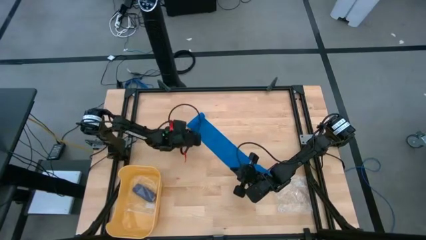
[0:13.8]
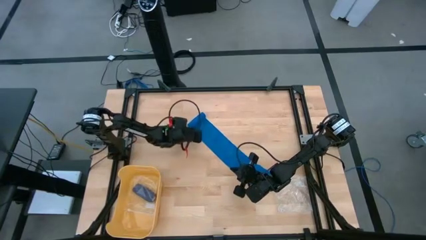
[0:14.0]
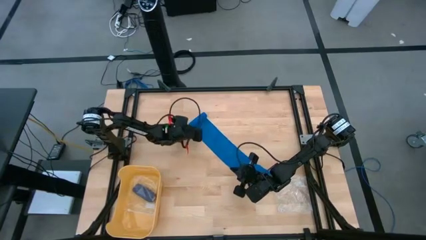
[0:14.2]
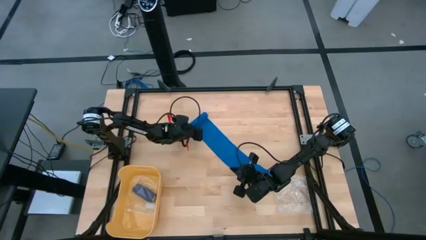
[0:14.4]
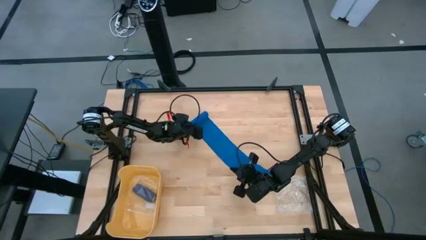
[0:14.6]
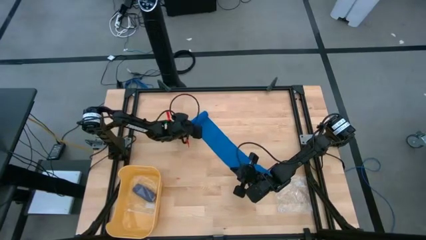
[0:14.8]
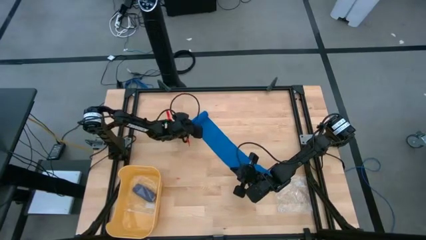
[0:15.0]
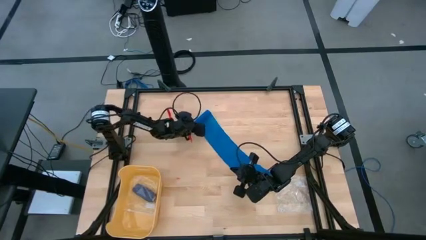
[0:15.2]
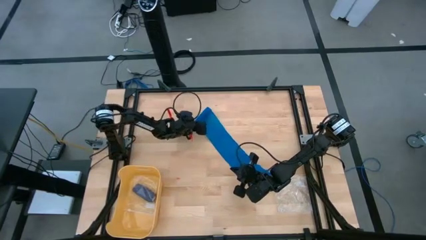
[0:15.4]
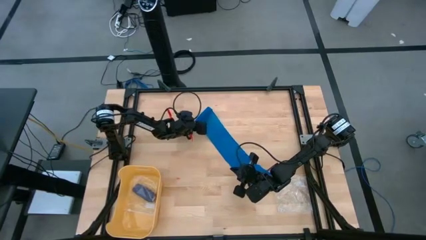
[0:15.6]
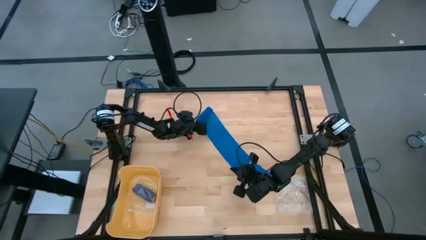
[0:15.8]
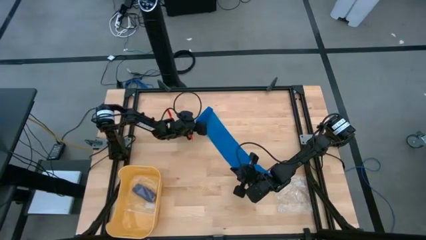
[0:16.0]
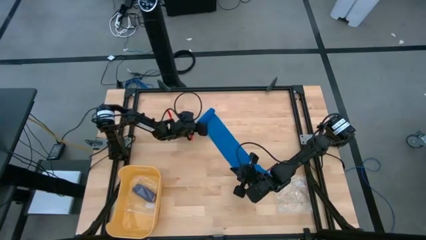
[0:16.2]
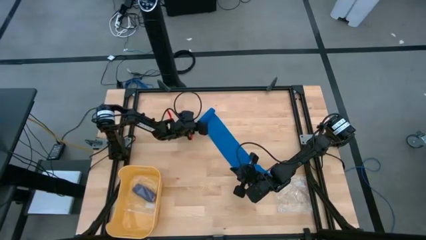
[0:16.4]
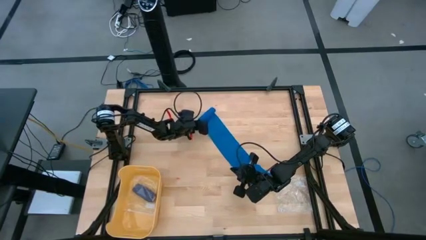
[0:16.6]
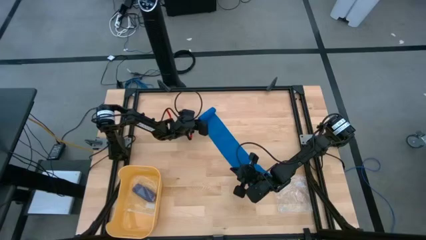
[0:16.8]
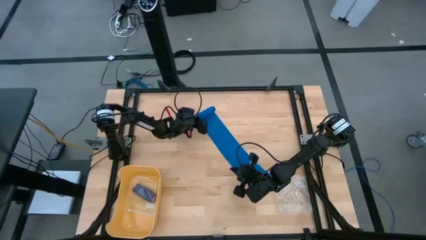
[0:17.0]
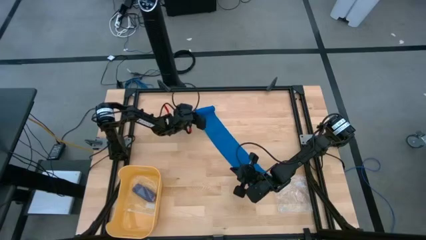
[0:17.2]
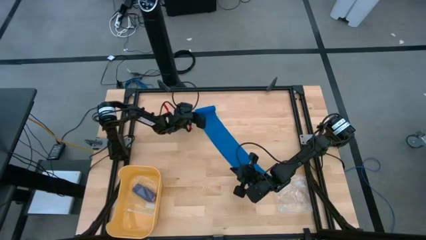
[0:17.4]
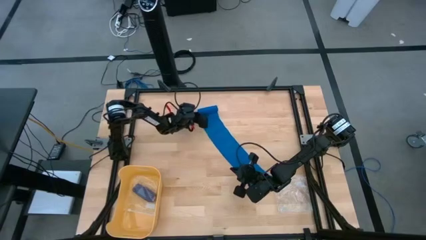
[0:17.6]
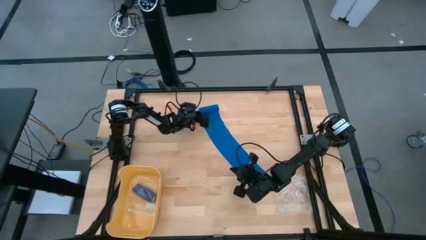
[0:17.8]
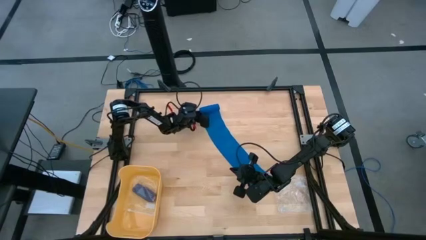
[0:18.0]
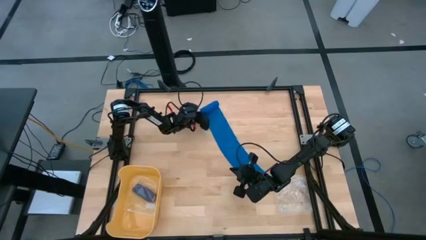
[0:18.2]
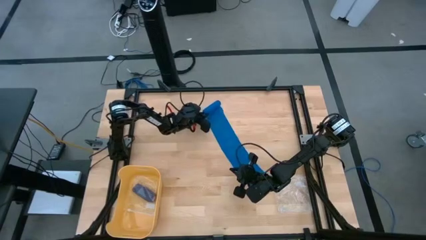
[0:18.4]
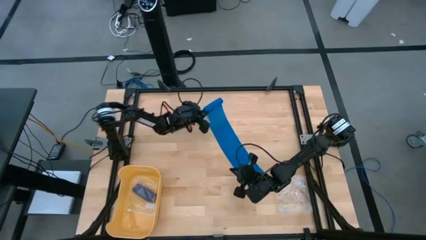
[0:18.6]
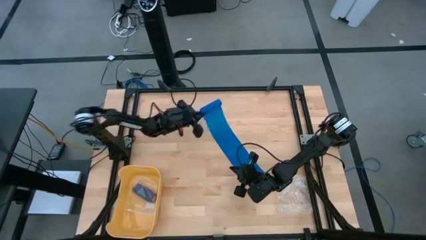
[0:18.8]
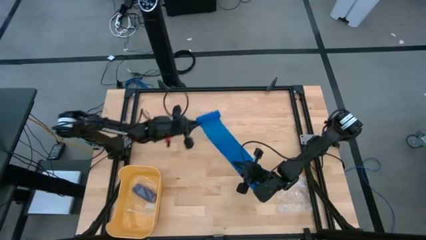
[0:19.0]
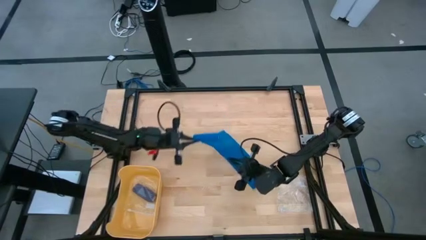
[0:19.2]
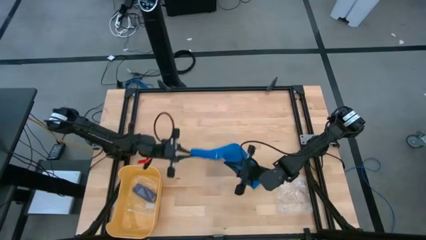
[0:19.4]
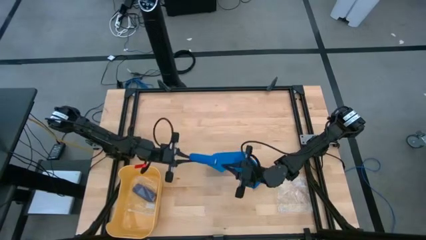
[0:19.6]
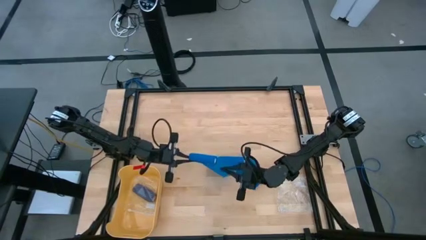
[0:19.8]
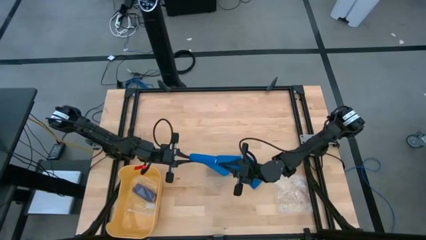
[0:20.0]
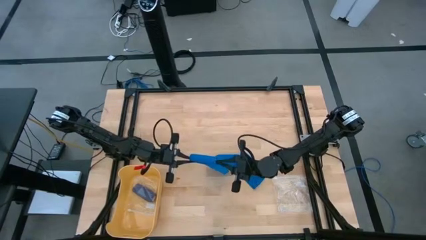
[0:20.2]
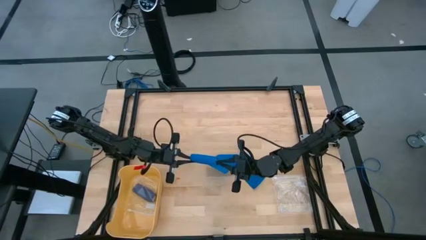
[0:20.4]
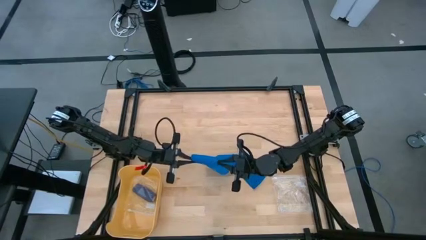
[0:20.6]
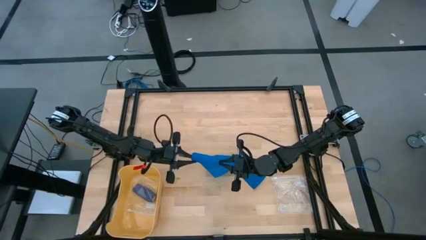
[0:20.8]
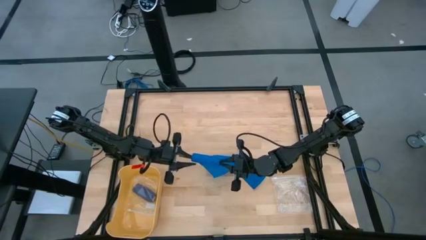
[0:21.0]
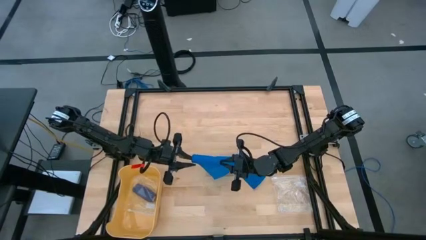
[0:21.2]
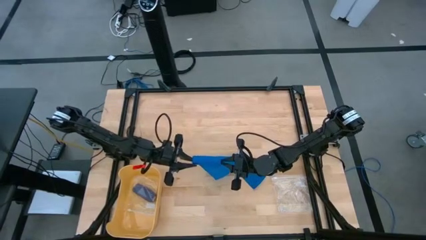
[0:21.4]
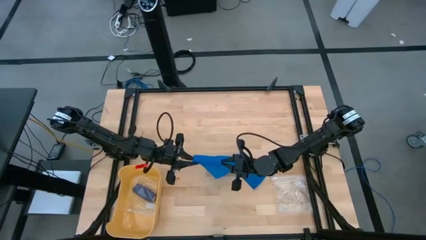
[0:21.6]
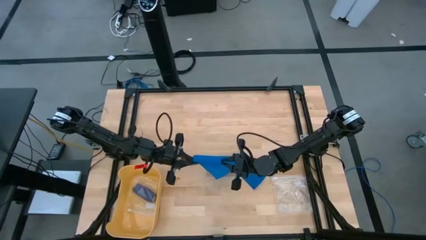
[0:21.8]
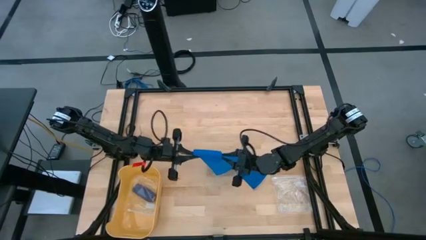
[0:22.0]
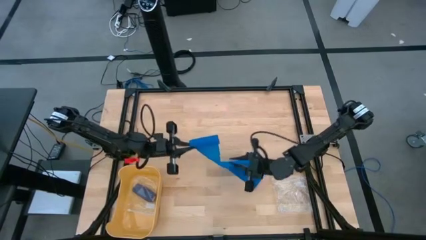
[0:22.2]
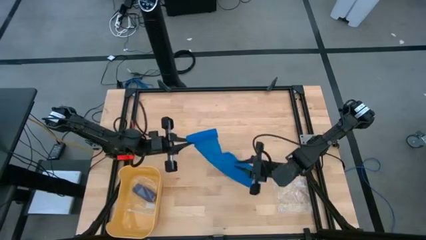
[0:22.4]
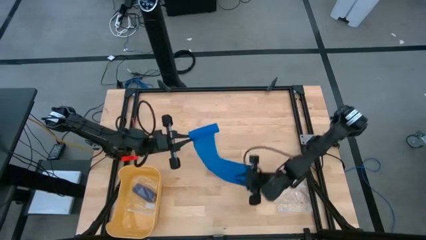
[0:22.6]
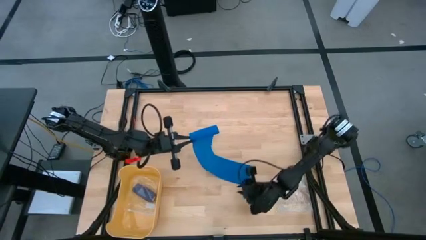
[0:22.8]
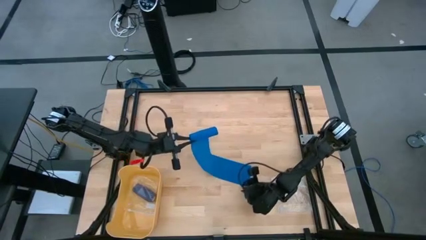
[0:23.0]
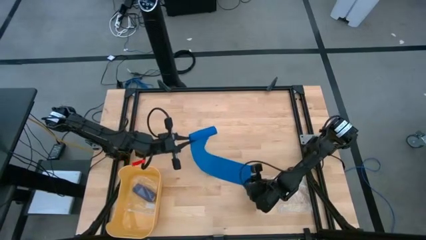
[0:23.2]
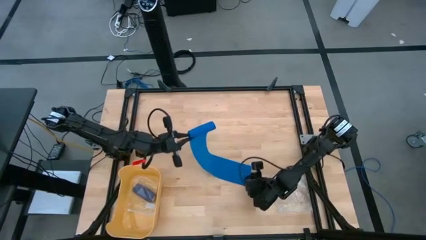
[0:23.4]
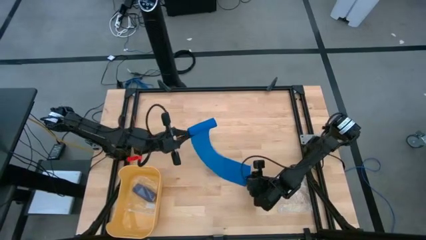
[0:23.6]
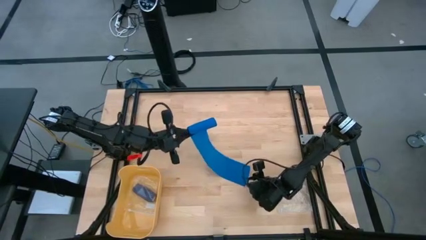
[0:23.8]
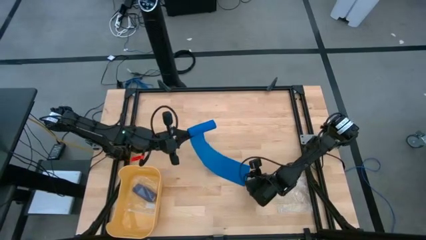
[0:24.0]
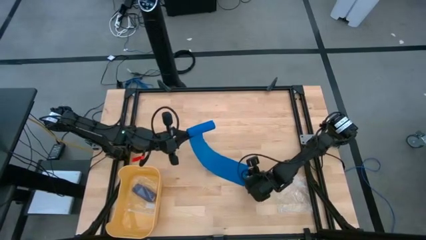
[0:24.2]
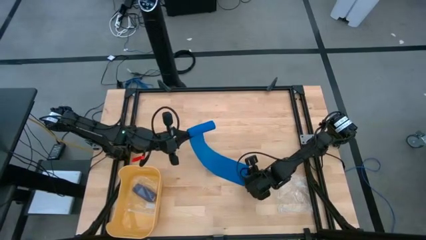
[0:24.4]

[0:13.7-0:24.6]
Task: Roll bandage
Roll the blue bandage

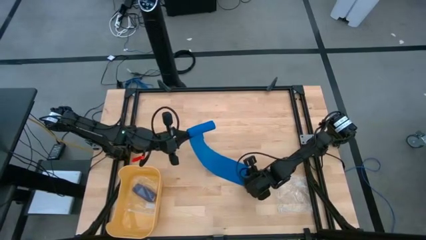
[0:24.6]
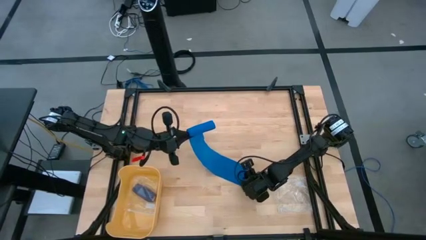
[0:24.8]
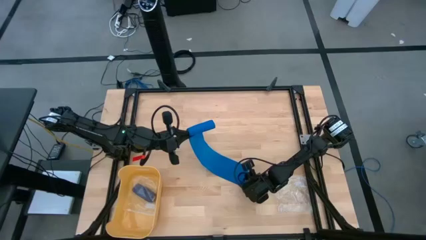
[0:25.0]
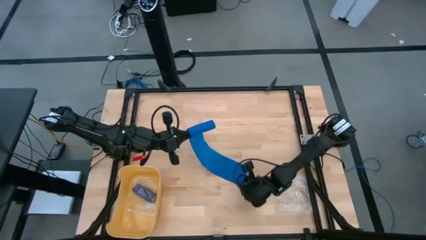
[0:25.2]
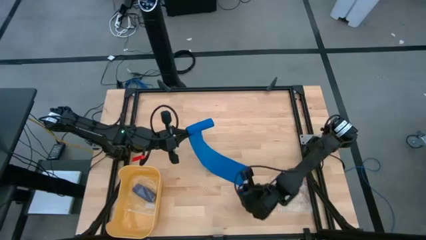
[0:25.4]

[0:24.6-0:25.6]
Roll the blue bandage

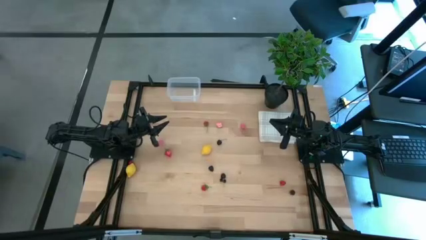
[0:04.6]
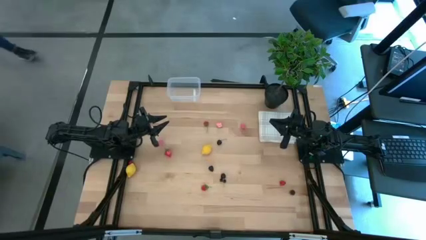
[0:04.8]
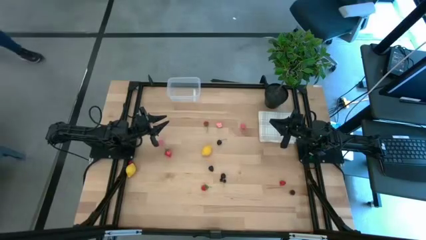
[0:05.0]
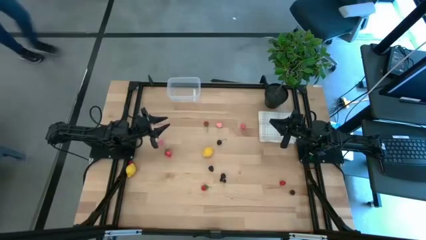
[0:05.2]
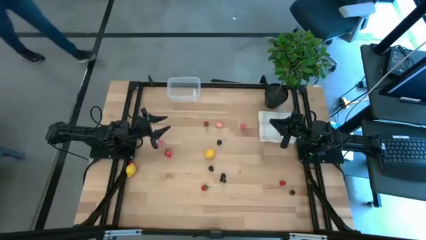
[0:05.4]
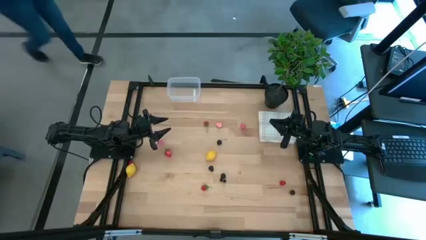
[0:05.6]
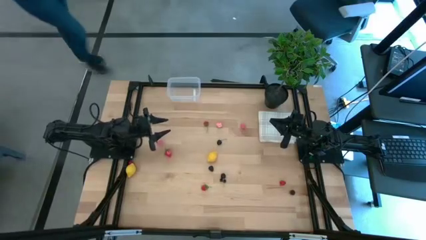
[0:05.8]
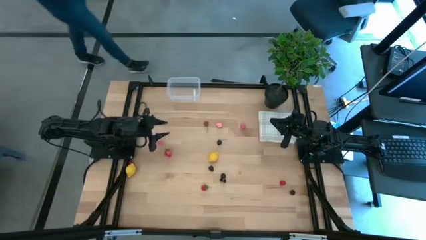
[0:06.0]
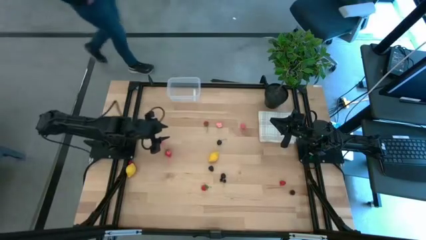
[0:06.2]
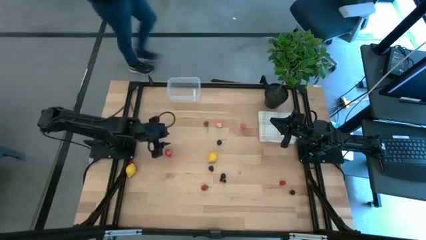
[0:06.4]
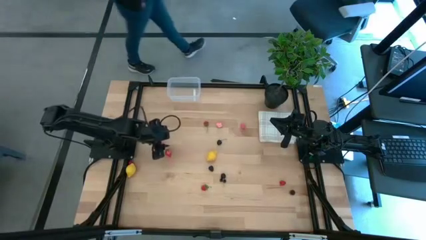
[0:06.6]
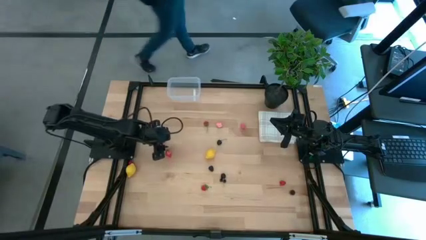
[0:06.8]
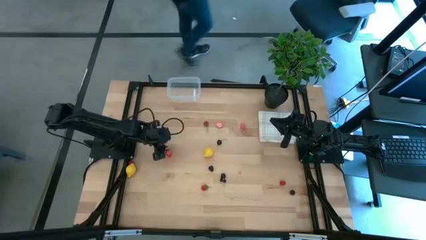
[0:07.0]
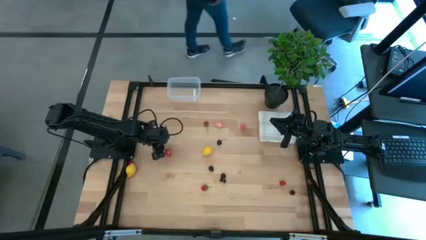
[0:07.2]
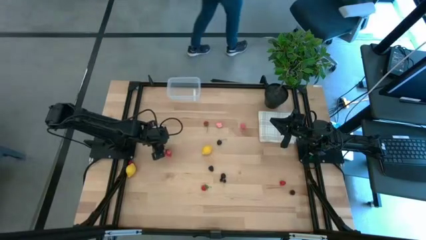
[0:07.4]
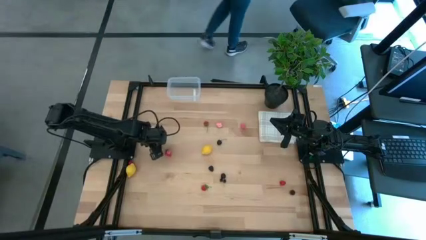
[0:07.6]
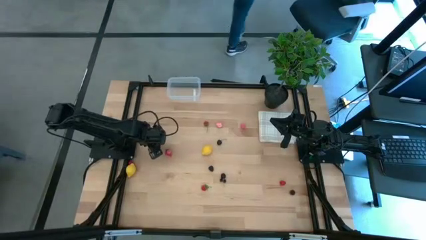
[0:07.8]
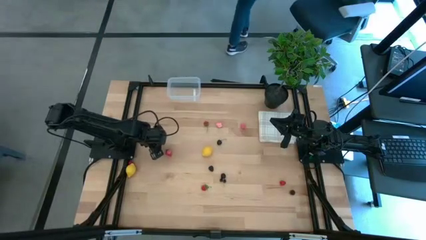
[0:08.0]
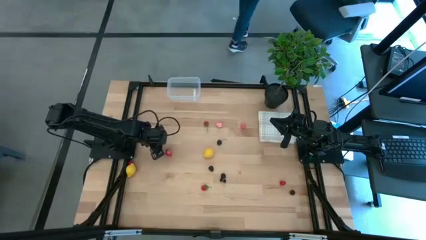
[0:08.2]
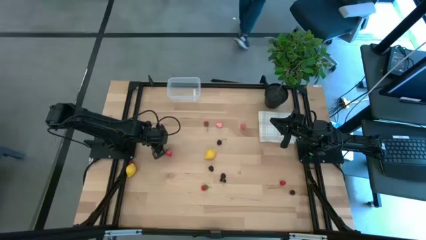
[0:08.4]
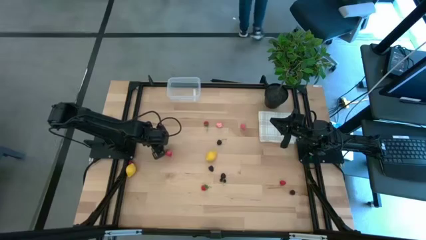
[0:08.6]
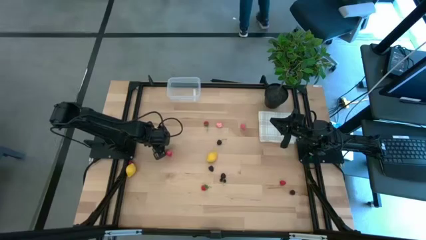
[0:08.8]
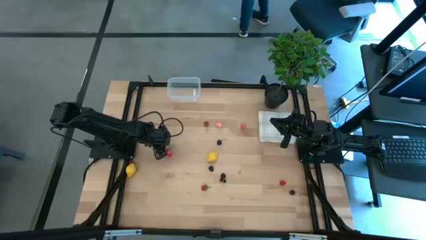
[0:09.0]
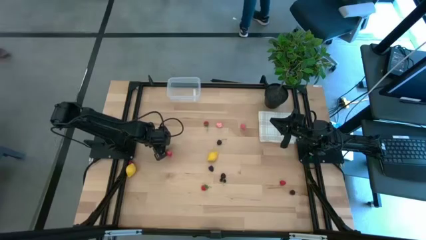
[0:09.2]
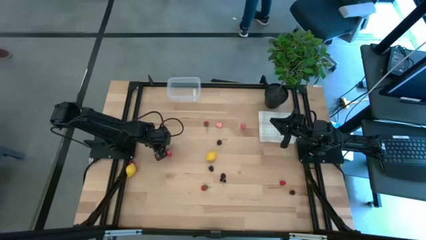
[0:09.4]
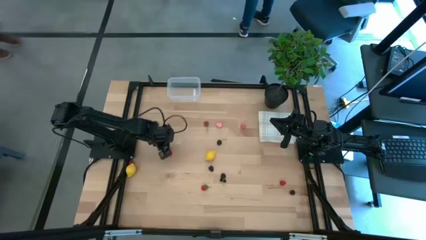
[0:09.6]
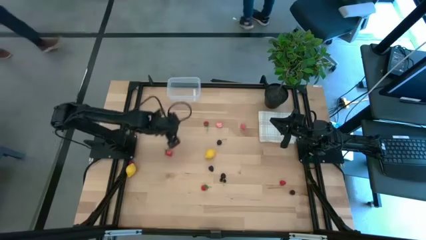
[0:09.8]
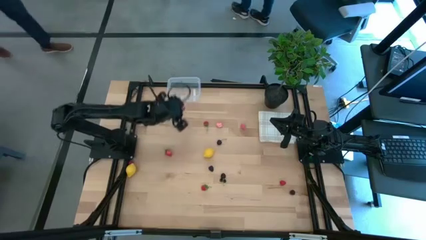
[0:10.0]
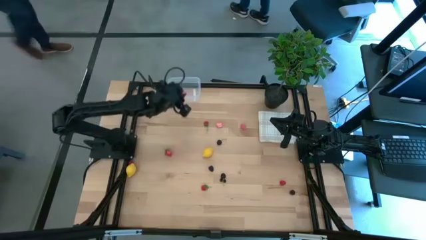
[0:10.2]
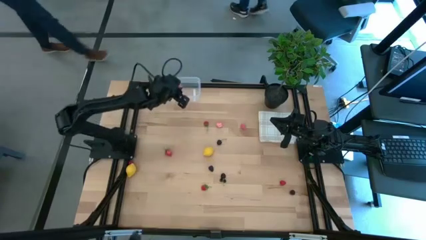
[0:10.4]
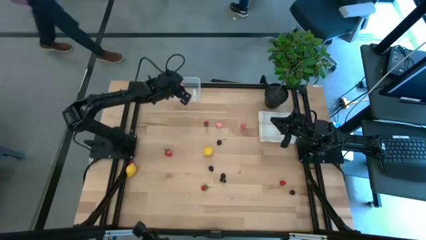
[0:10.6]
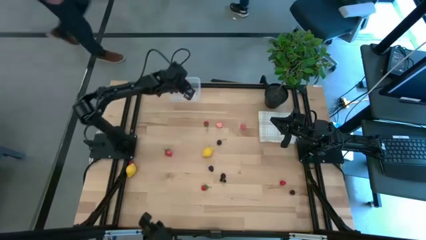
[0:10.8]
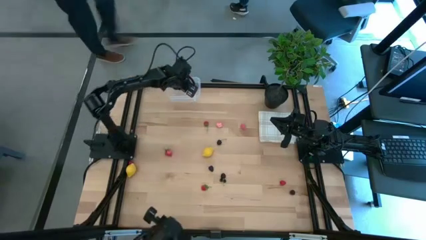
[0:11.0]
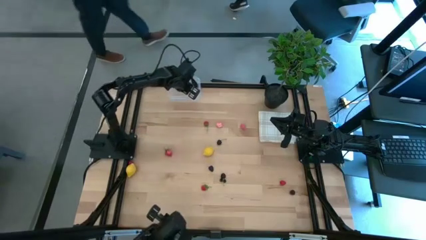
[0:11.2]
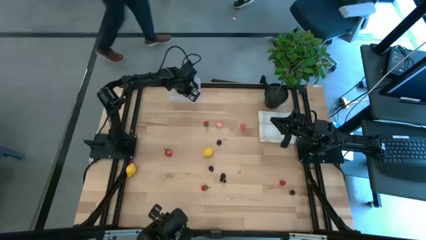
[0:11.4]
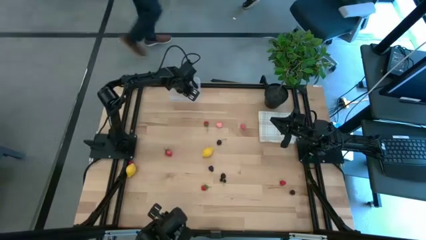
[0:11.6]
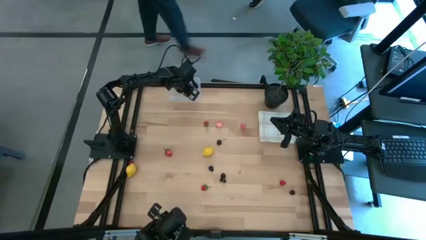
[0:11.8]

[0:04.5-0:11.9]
Task: Pick and placing Produce into tupperware
Put the bottom left pink peach into the transparent bin
